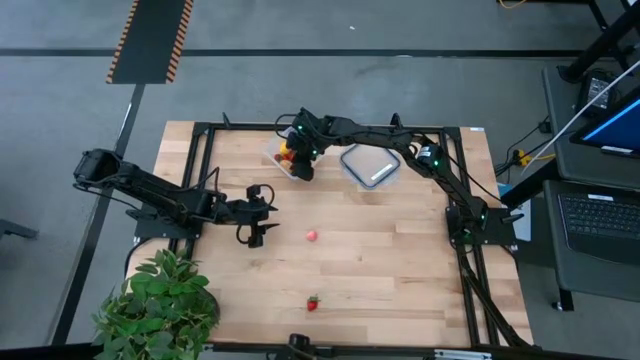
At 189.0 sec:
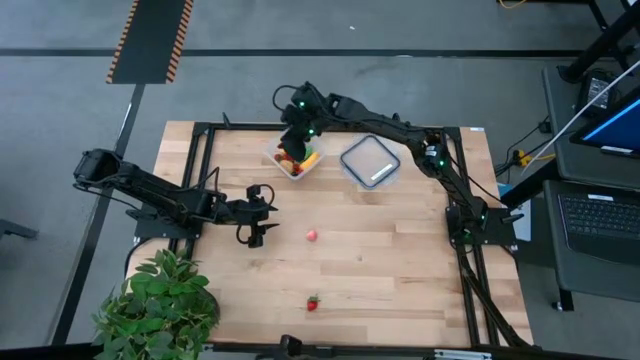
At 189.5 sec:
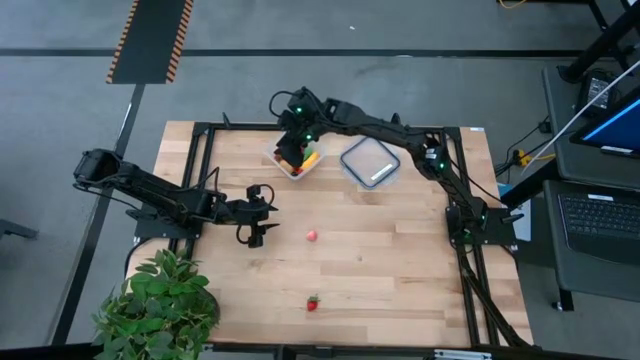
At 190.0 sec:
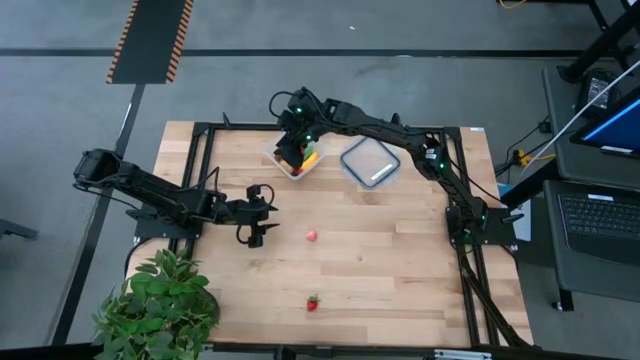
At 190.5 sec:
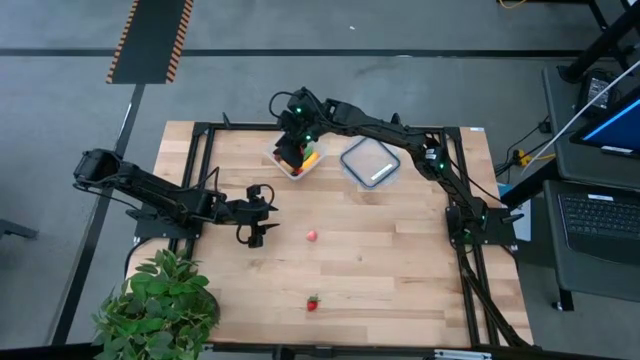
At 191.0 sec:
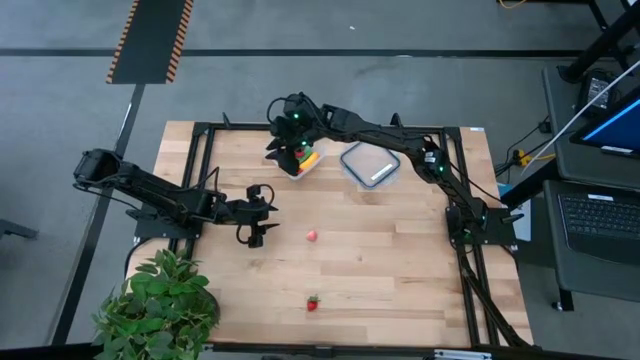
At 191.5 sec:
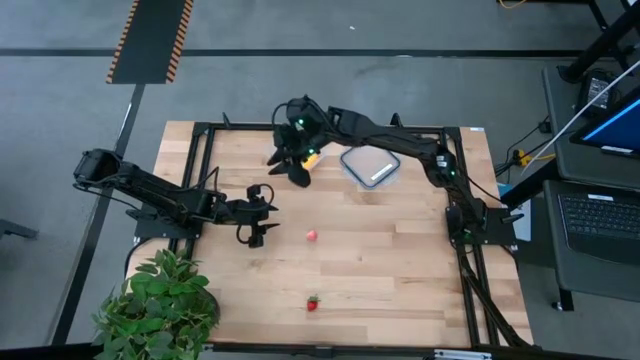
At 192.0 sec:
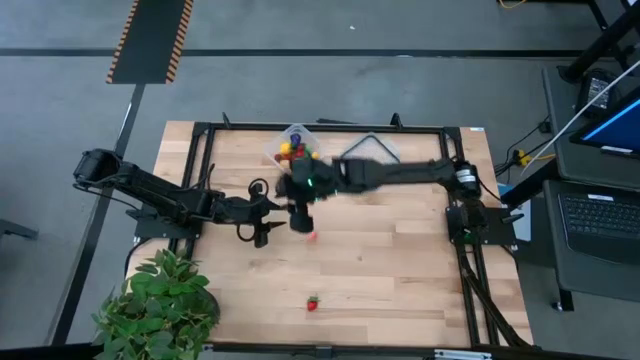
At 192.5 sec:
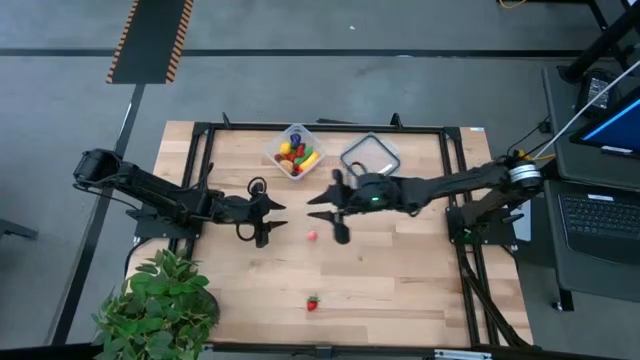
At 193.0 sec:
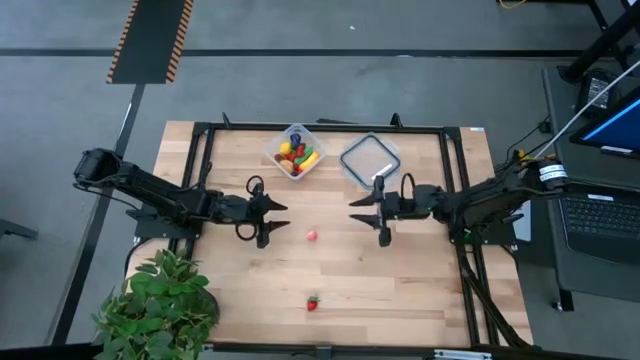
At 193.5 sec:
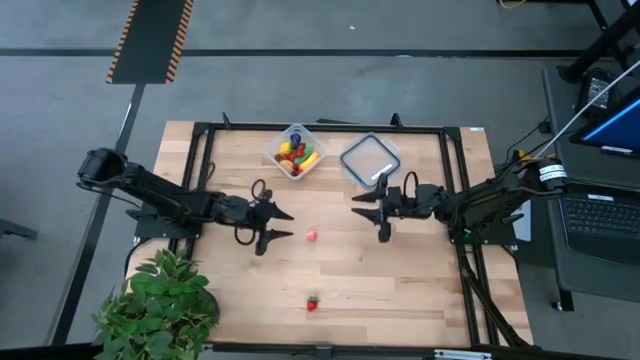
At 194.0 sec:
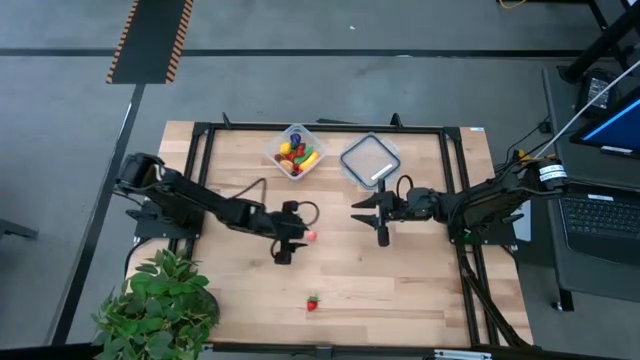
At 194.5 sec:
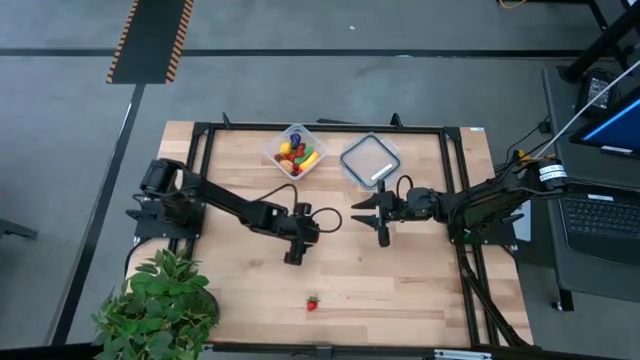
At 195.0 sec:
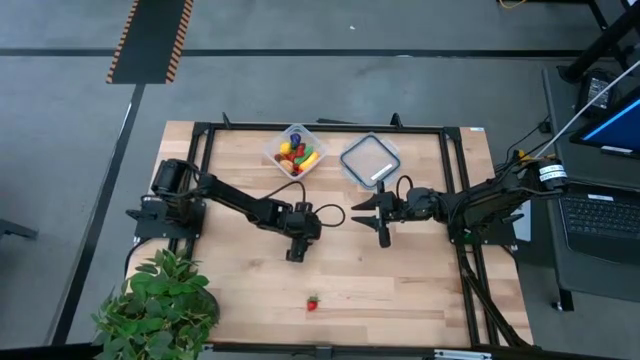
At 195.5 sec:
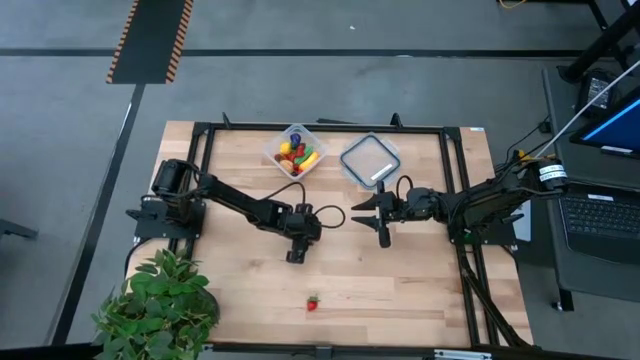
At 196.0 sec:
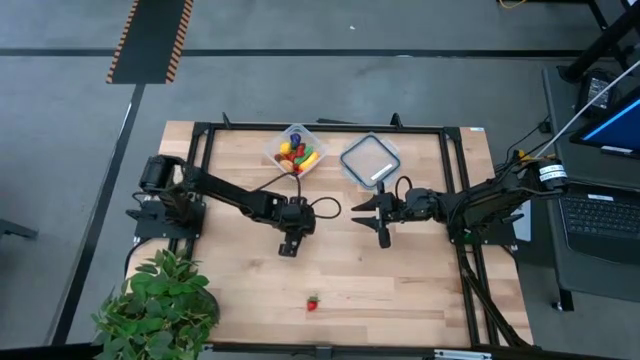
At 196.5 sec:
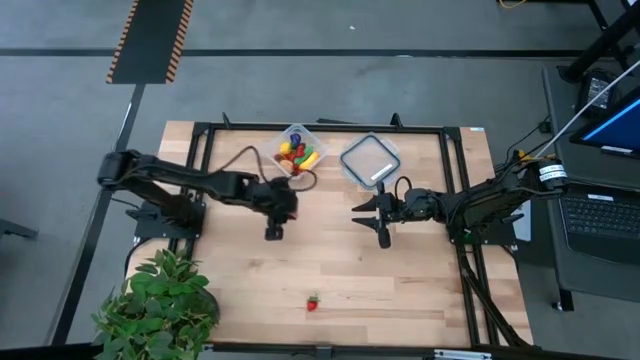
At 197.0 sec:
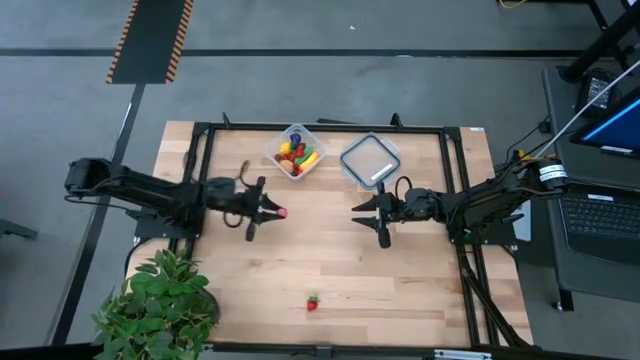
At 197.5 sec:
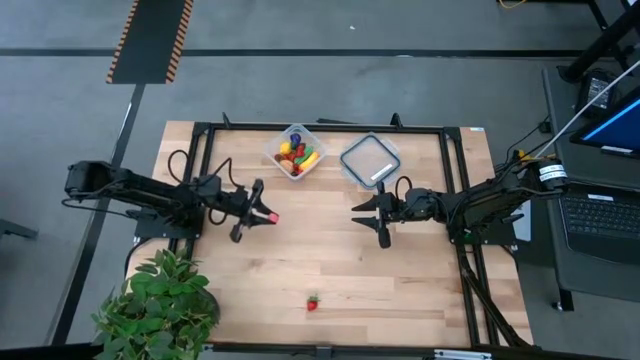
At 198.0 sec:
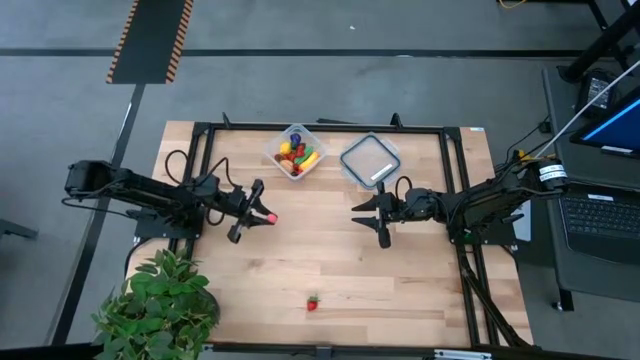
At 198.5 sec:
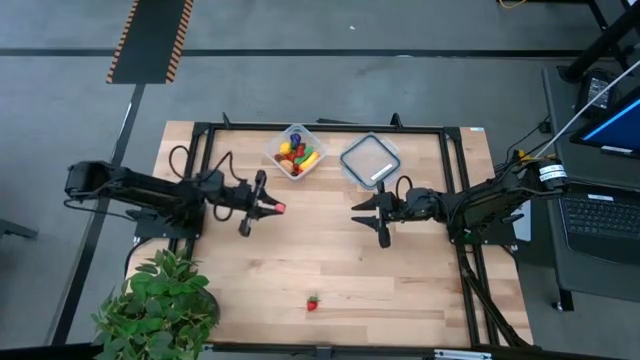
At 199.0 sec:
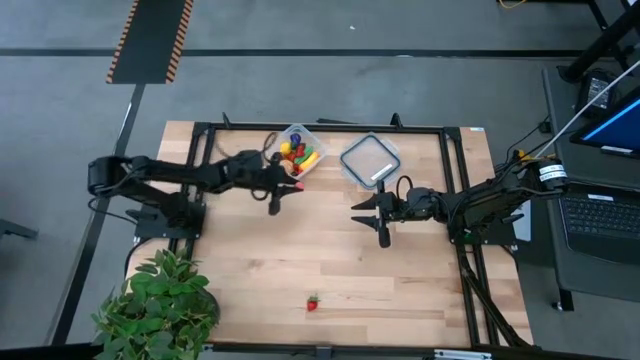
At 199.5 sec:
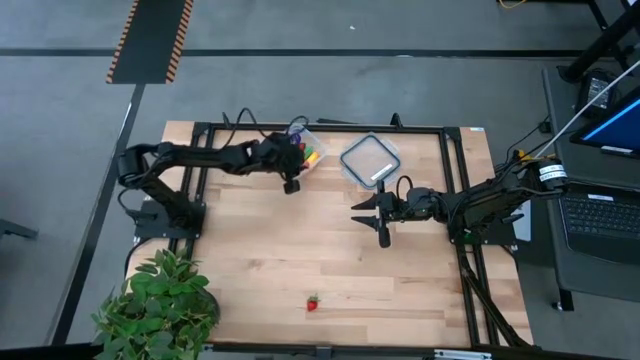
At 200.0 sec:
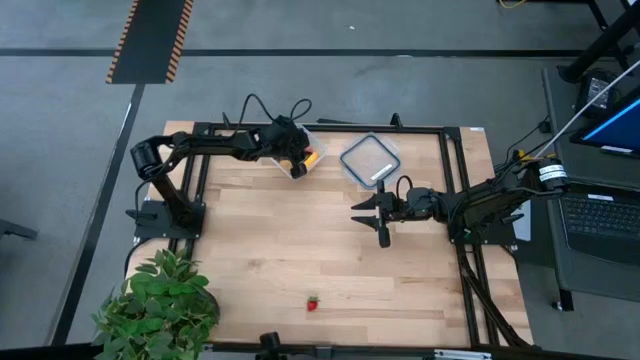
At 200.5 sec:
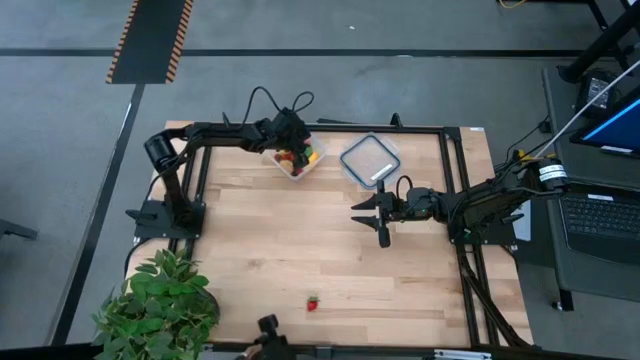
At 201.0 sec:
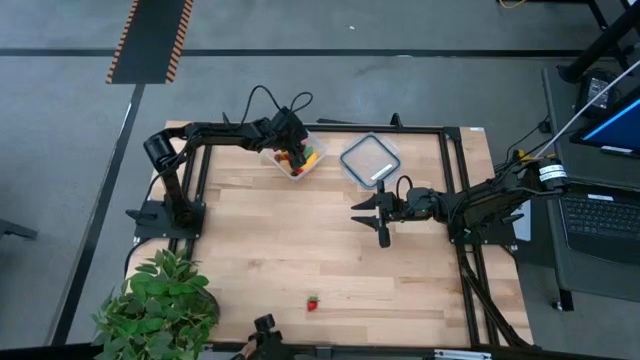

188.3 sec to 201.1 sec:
Task: Pick and placing Produce into tupperware
Put the peach into the transparent container

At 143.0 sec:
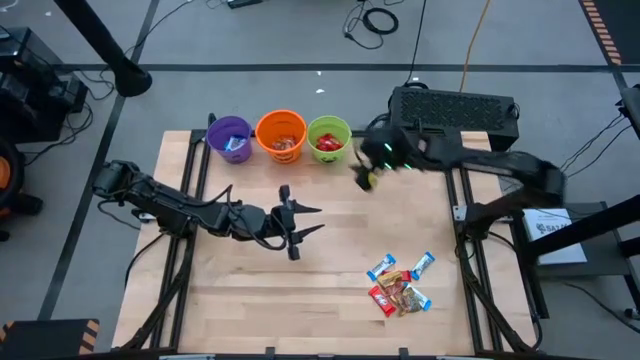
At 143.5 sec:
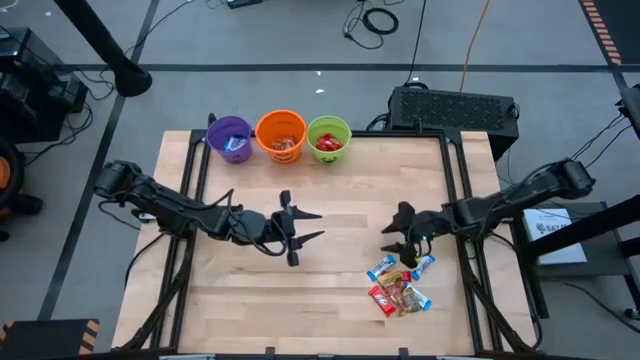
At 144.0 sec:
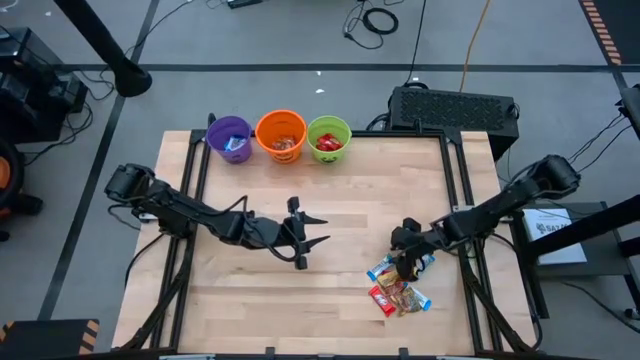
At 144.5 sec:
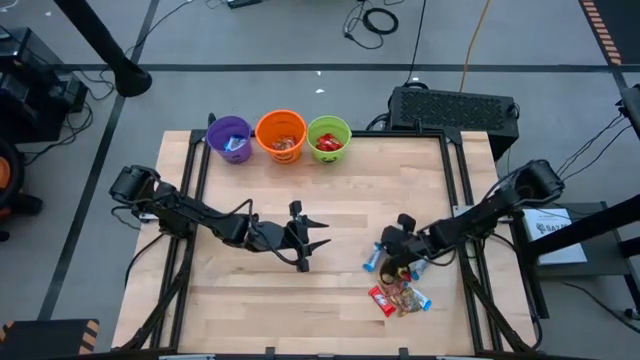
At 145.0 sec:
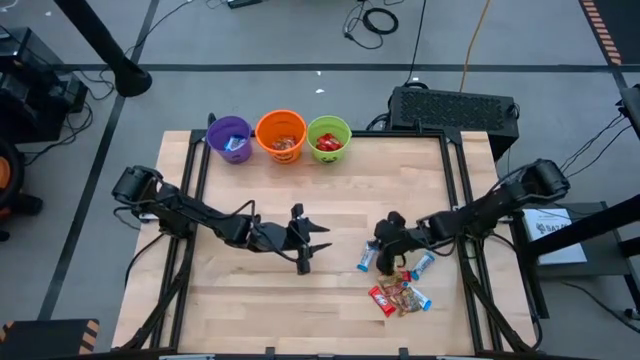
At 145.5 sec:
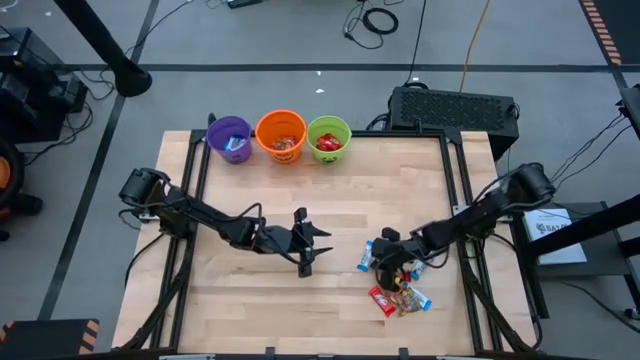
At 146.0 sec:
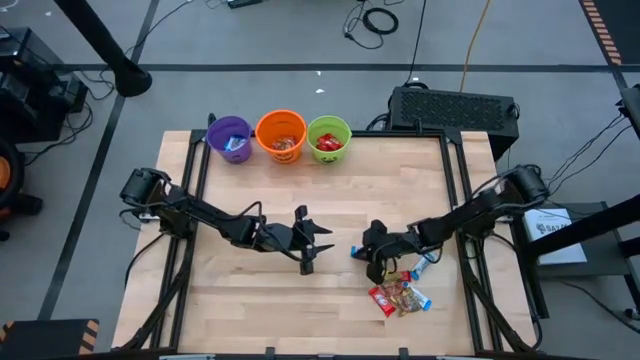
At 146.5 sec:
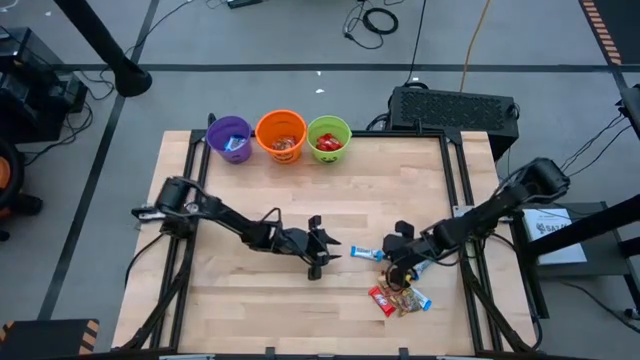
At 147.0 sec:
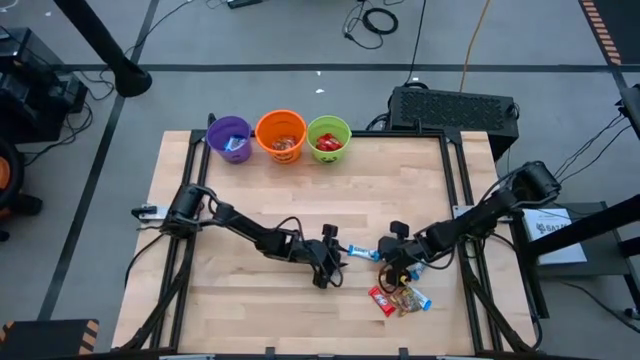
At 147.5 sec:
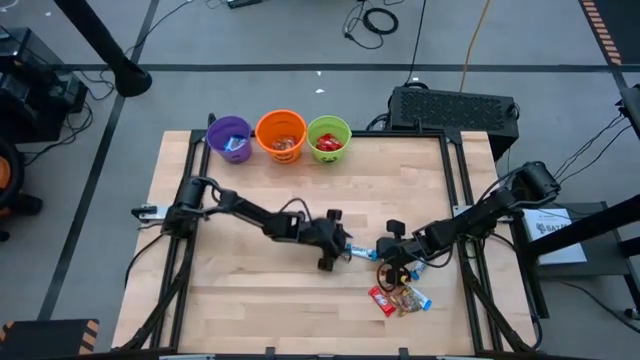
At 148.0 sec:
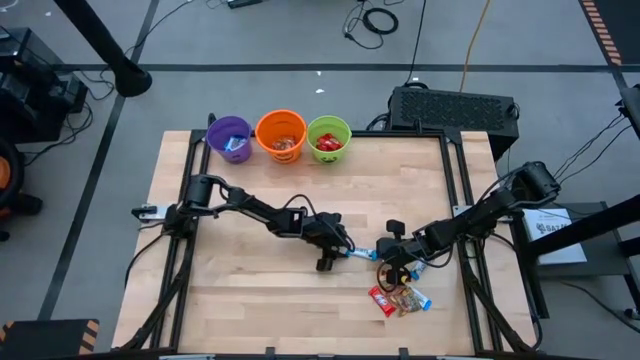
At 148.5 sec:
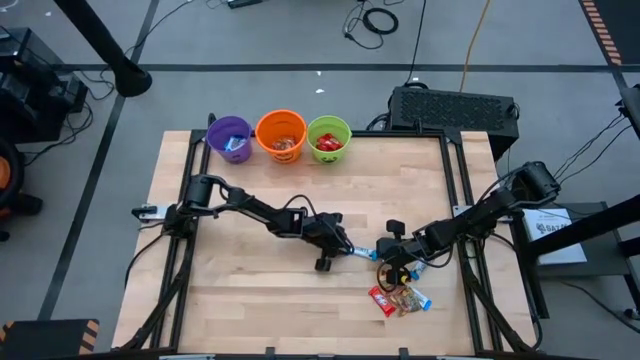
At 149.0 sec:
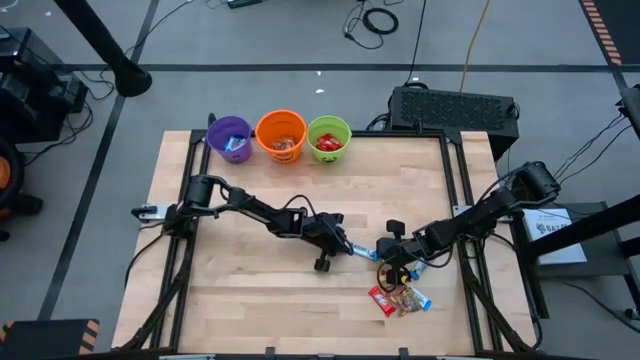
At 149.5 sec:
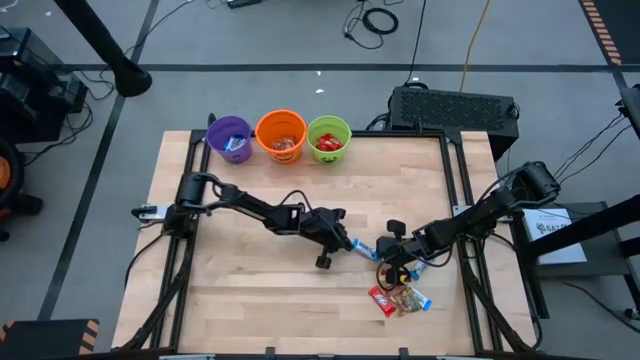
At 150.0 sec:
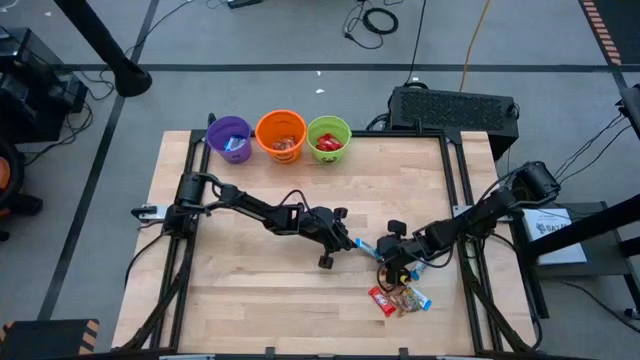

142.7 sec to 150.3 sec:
Task: Sort candy by brand, put in halloween buckets
Put the white chocolate bar into the violet bucket
